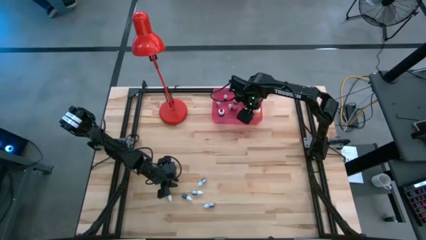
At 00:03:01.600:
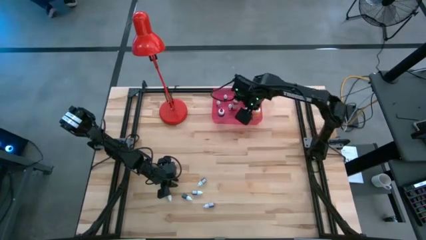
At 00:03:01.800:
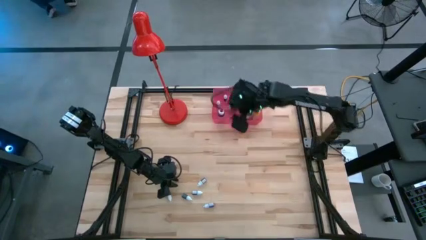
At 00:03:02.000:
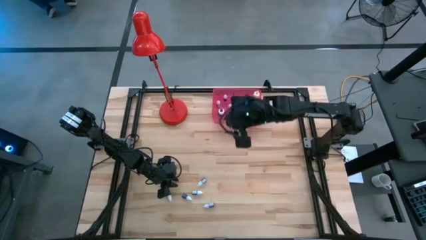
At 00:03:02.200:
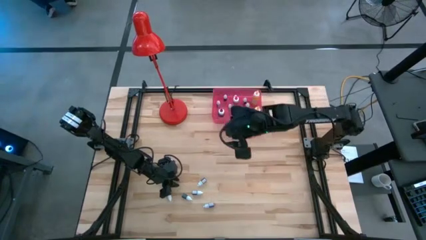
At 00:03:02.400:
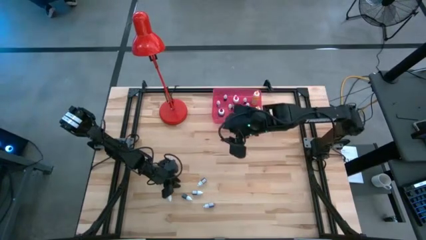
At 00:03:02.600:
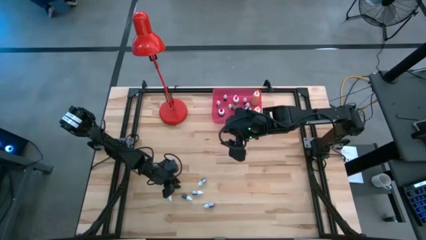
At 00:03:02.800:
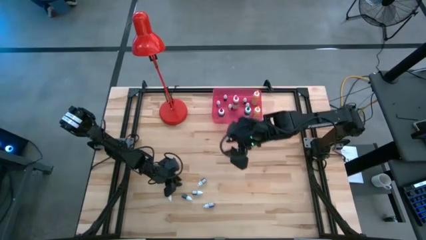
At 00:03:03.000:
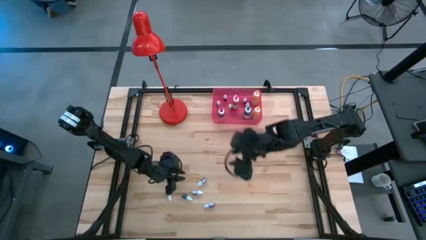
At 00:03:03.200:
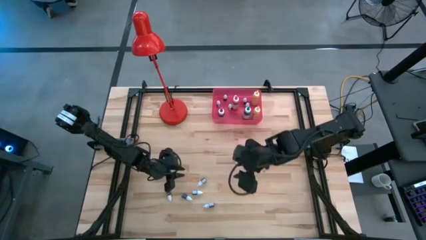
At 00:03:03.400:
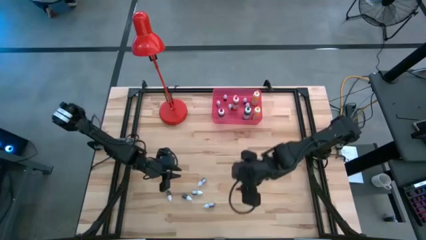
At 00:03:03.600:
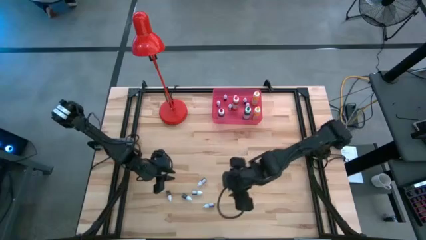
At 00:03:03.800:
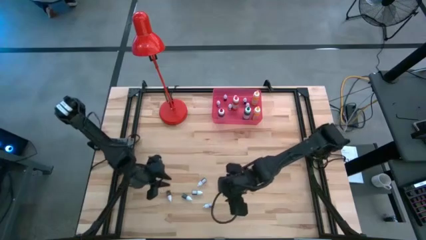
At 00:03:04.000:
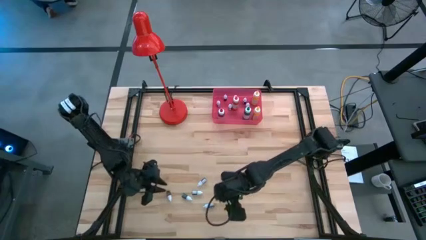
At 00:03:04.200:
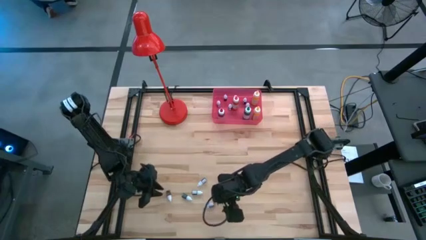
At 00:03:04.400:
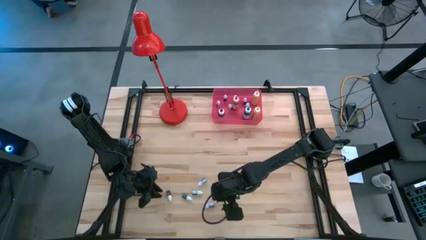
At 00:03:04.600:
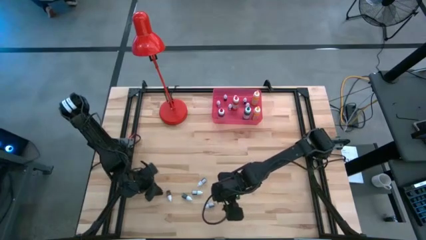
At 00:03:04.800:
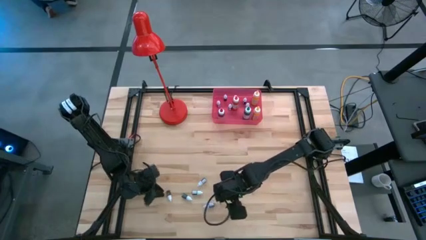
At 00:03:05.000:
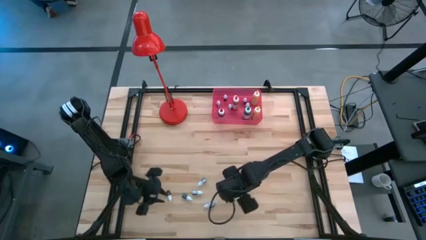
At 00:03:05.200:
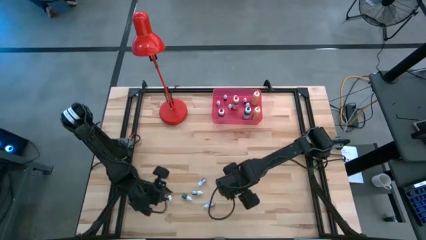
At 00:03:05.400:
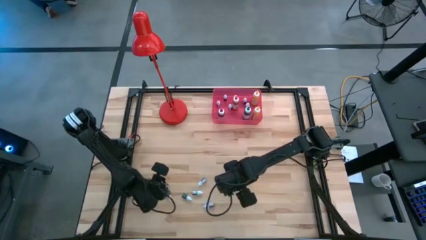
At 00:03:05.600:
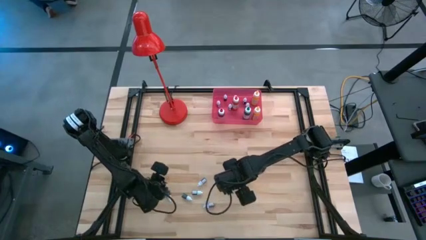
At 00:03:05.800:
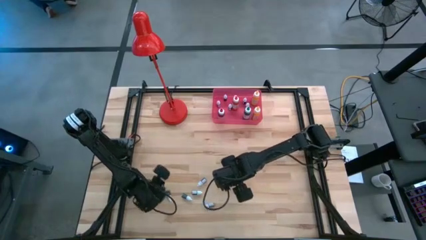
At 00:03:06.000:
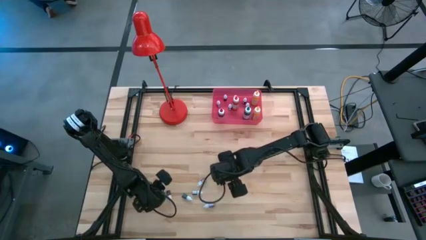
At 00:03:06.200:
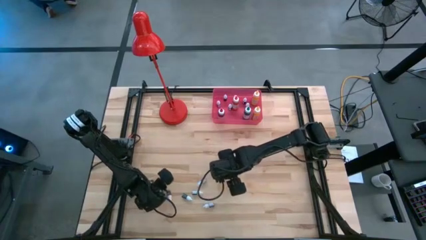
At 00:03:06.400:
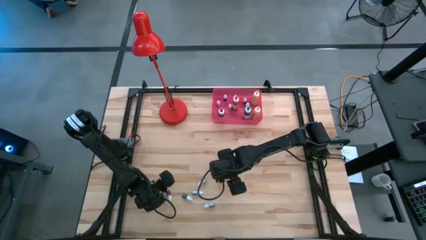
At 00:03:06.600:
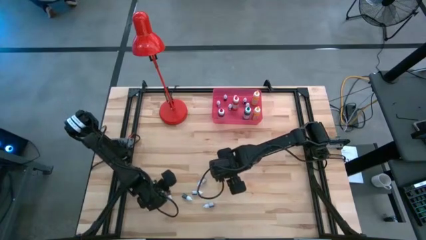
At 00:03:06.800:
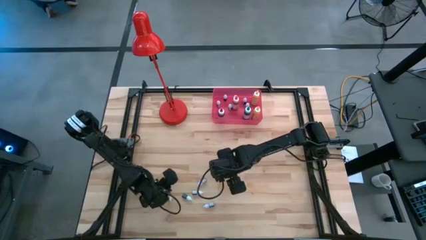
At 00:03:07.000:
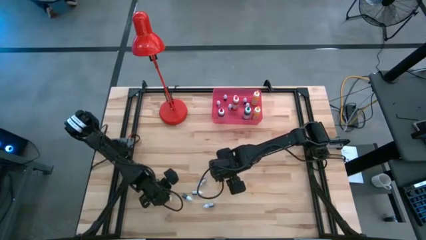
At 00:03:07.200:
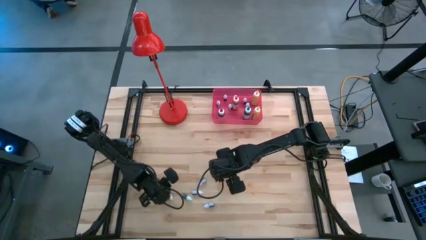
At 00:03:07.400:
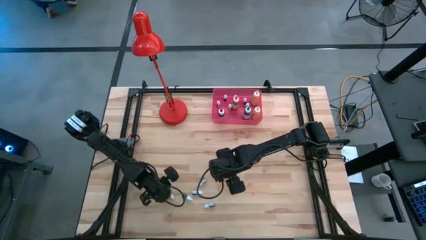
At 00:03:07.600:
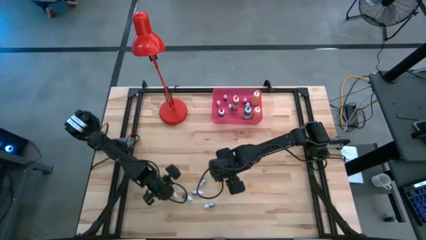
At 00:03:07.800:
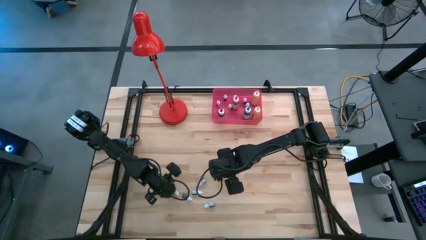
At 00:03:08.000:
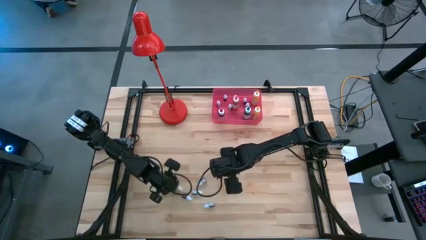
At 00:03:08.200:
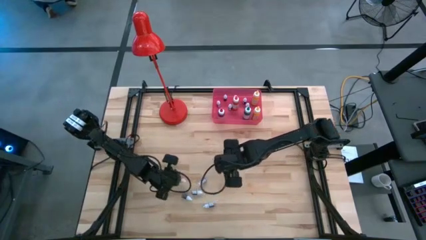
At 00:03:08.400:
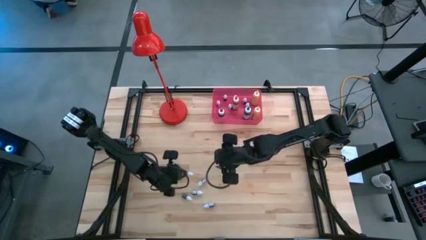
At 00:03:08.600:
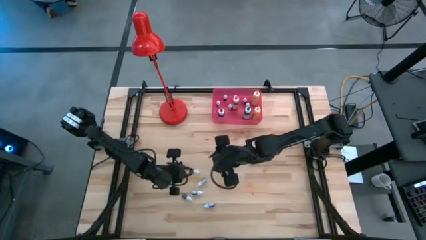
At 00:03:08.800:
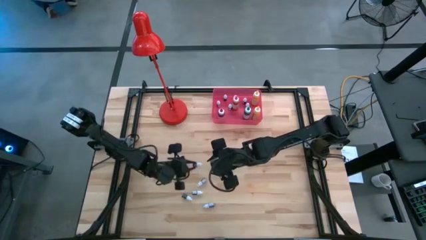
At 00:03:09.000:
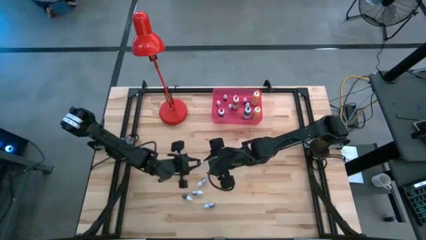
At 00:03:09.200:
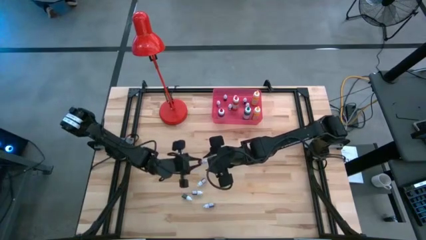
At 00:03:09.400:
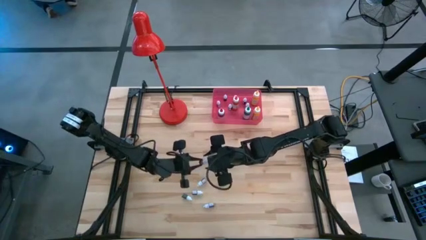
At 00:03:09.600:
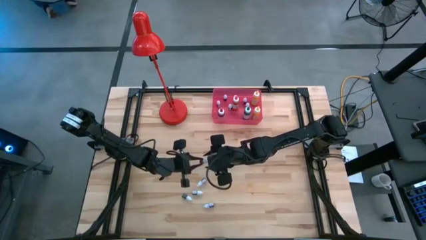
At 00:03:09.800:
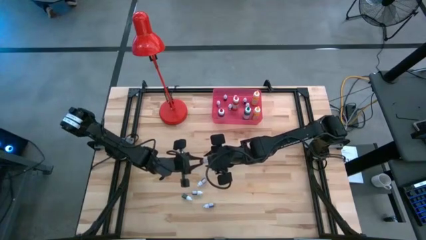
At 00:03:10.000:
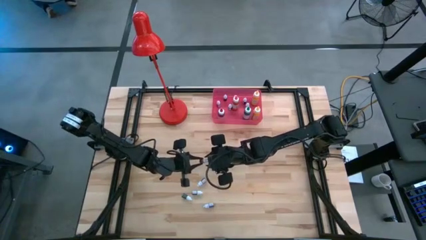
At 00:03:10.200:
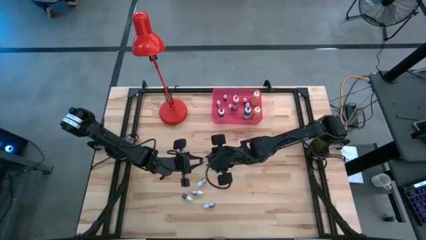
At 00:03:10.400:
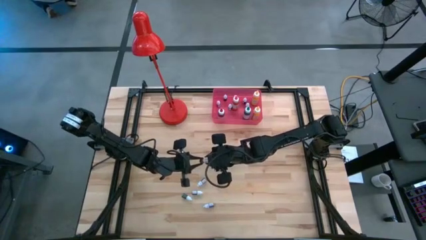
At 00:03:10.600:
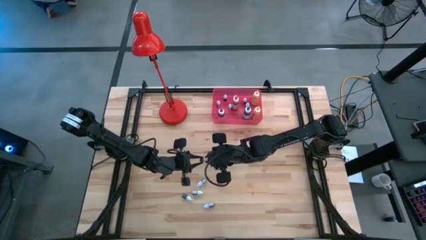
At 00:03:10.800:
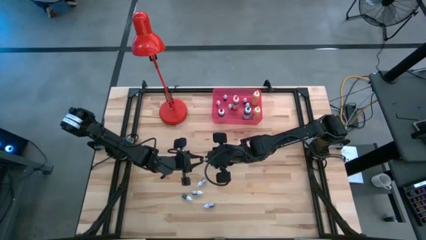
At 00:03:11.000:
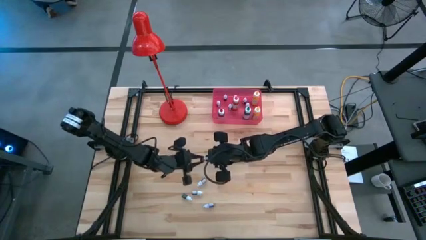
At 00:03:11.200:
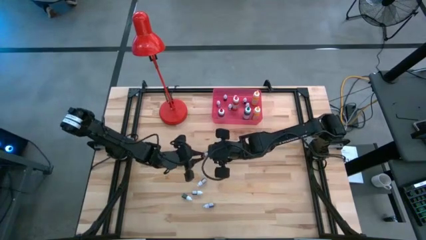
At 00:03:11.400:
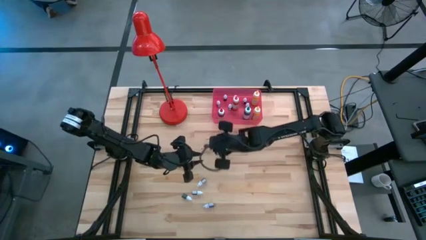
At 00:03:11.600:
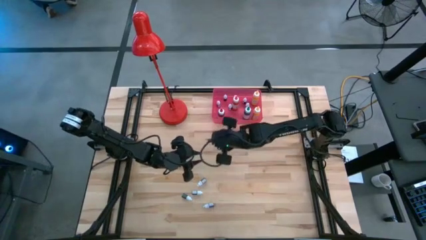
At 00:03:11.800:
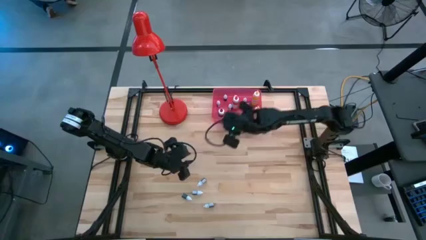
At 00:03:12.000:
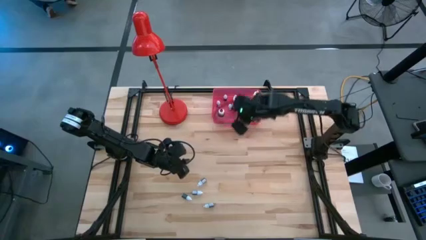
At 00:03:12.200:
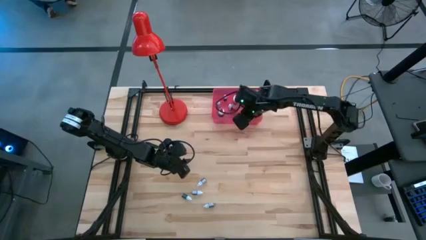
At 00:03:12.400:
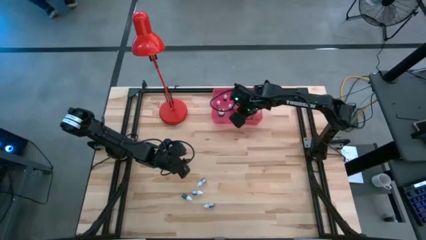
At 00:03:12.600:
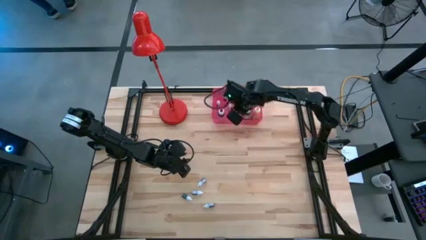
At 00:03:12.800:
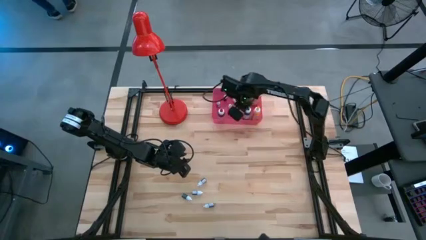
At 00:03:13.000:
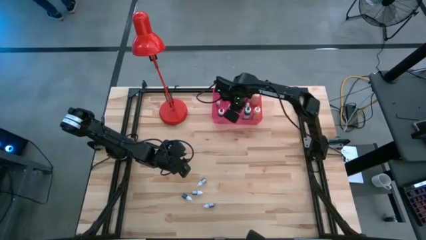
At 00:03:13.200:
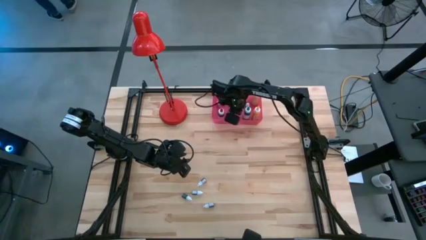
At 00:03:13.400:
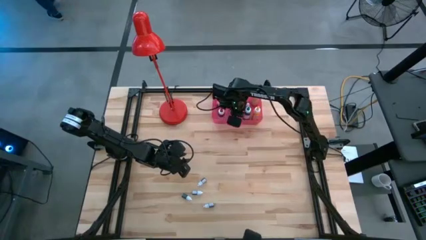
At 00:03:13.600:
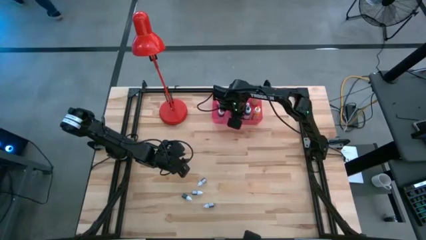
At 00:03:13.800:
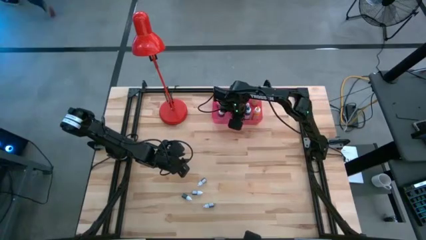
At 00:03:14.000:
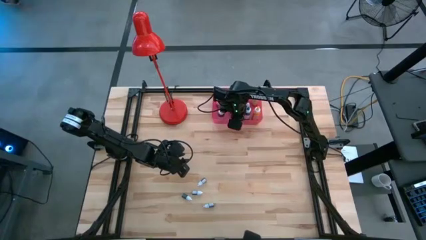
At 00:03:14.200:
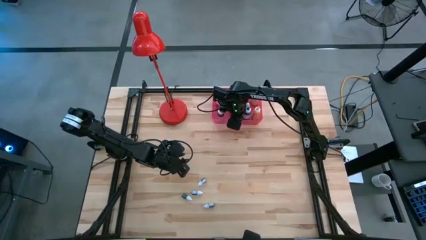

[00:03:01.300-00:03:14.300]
Task: Pick & Place food coloring
Put the small red food coloring bottle into the red bin

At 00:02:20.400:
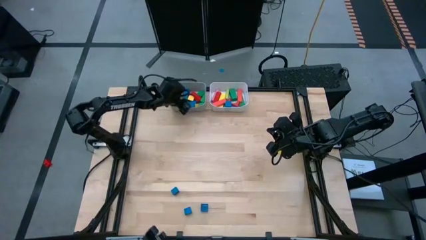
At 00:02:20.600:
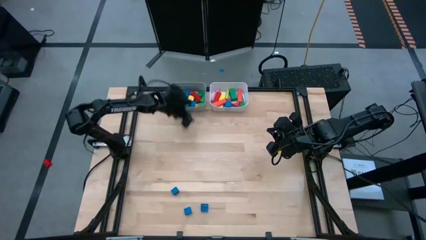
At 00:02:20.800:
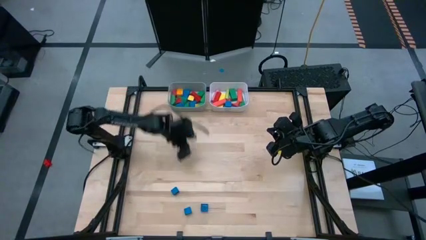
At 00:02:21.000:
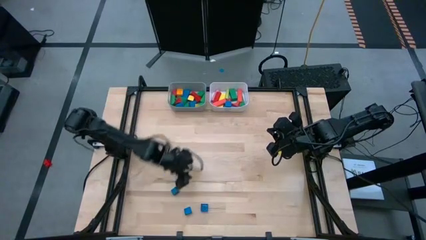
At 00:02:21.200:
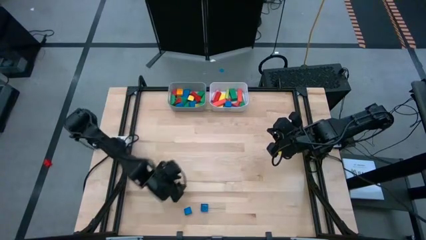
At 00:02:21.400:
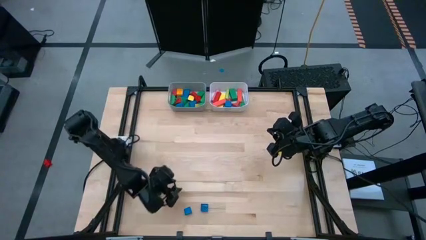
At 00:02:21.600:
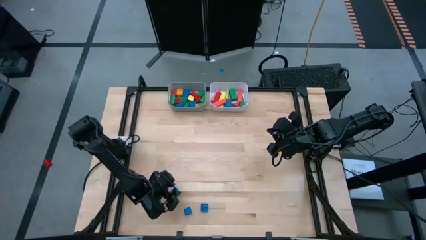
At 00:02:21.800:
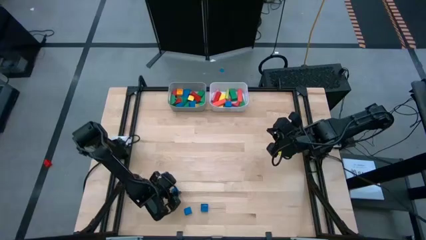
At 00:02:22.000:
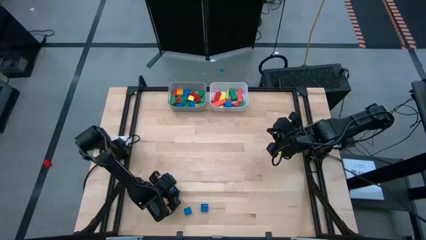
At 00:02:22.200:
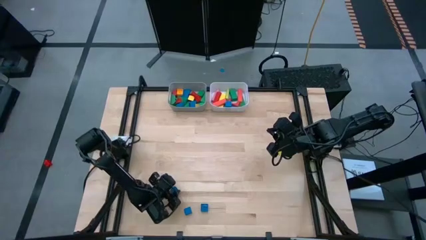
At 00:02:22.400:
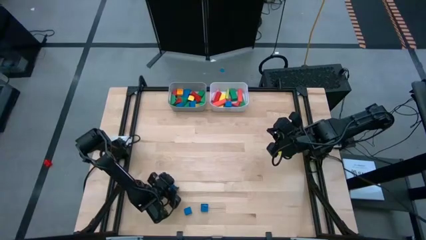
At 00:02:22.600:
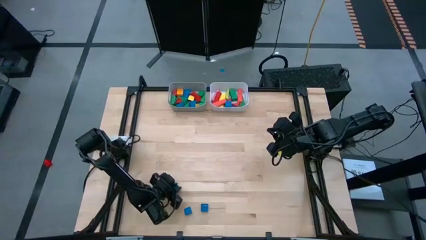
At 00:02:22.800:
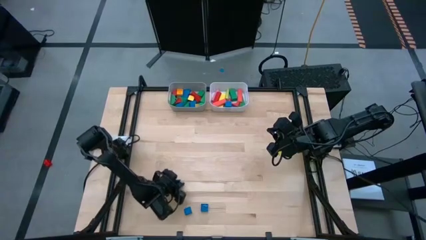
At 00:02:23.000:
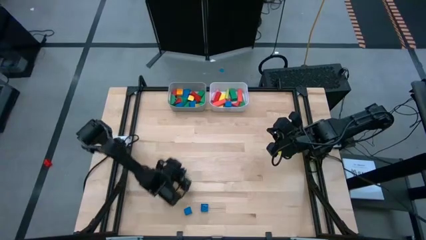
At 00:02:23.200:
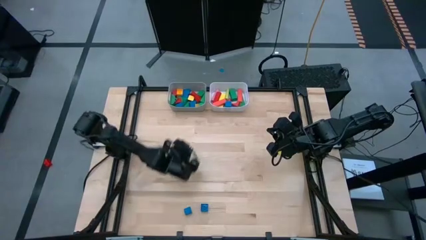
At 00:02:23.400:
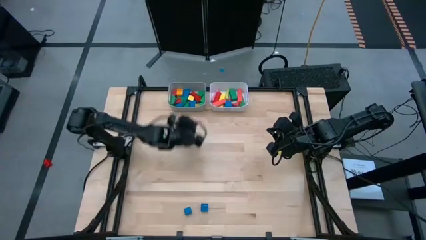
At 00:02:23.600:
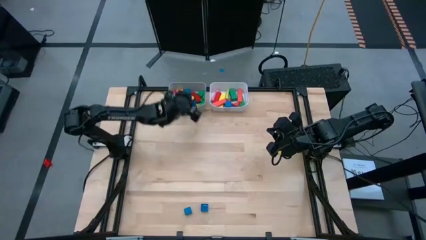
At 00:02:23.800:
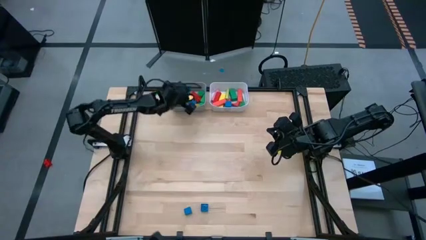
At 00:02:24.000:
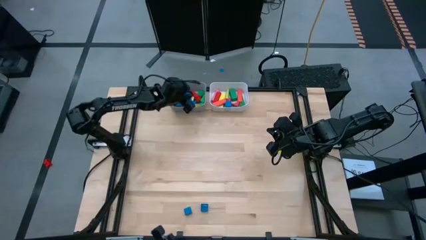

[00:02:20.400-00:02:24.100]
Task: Sort blocks by size
Put the blue triangular block into the gray bin
